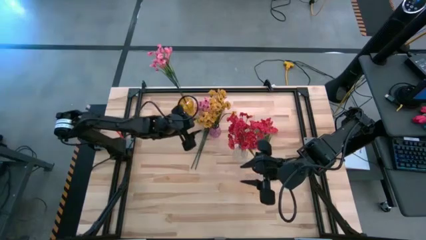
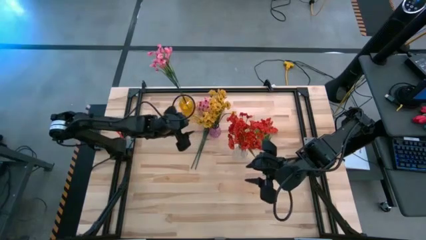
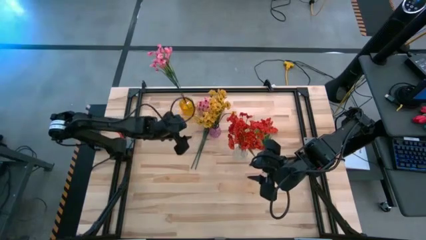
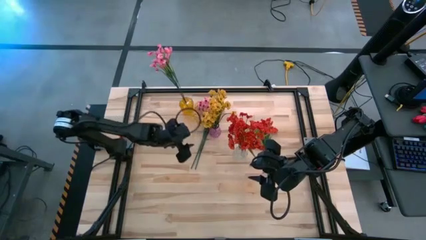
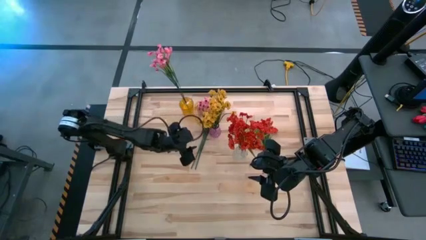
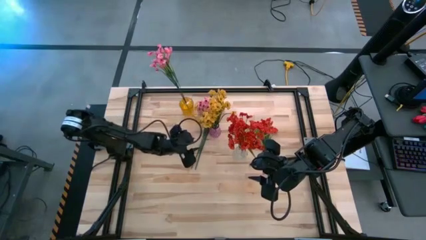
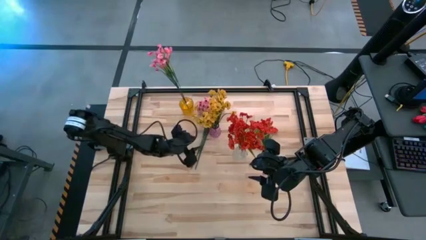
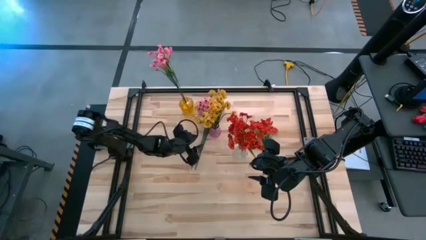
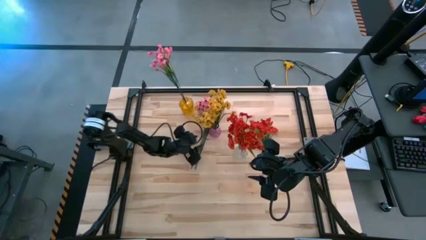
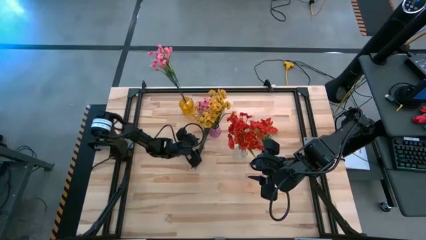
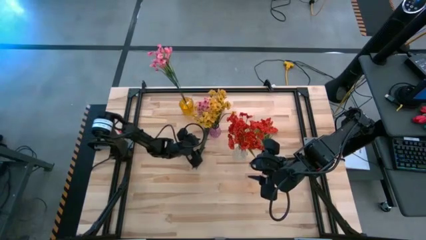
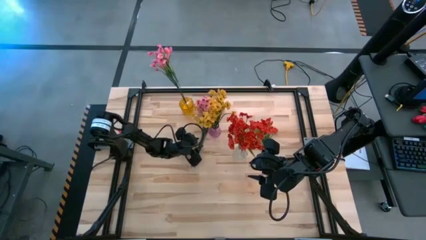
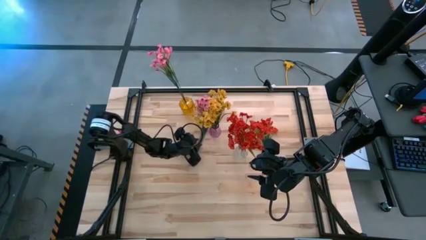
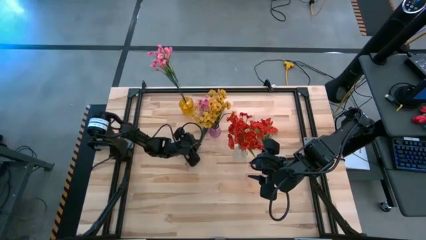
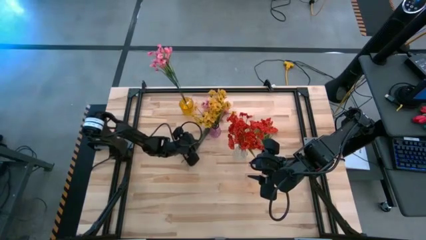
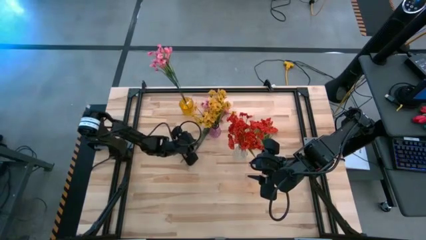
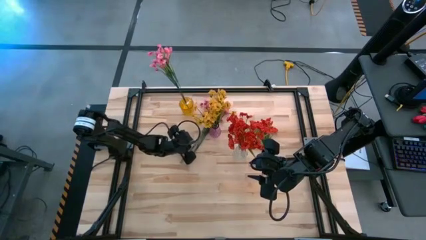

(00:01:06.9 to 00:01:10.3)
Task: Sort flowers into vase by color
Put the left pink flowers into the yellow vase

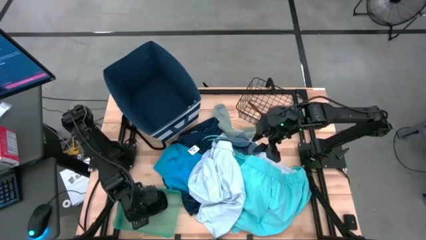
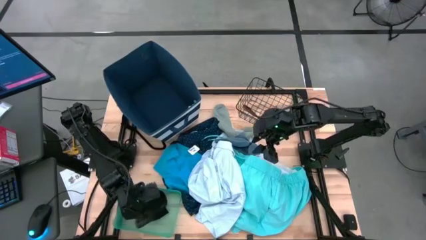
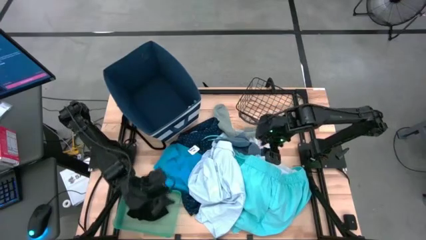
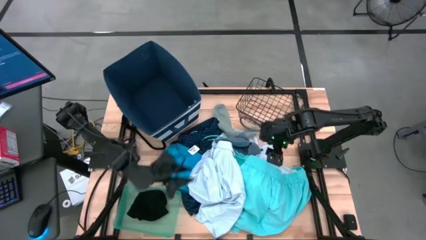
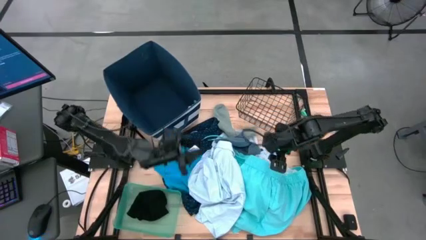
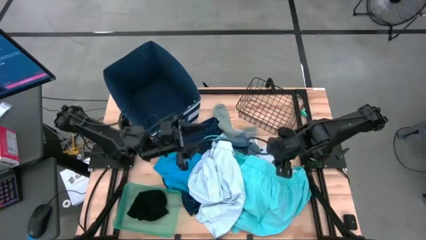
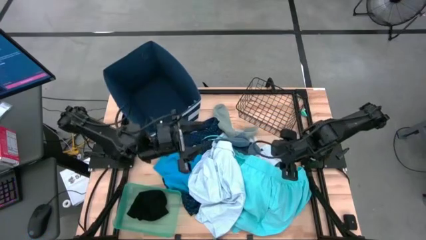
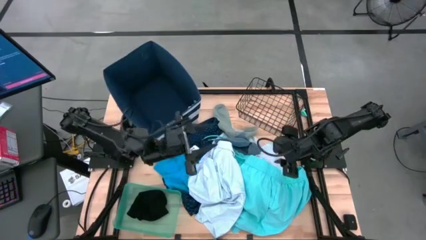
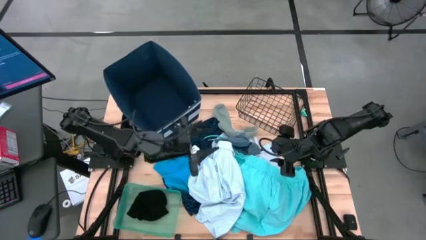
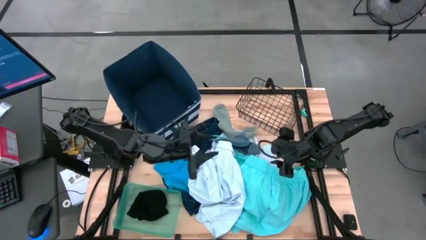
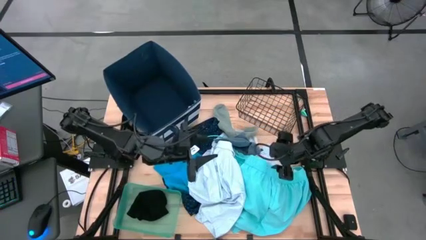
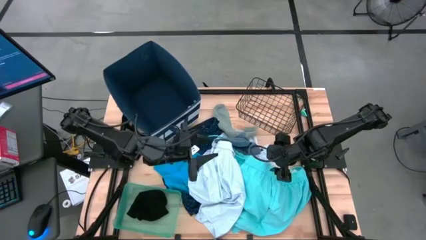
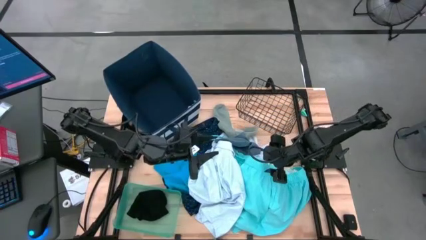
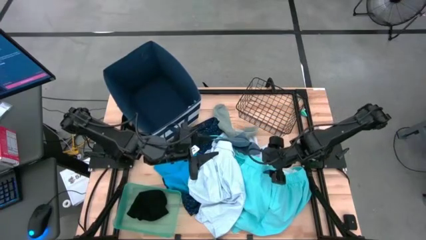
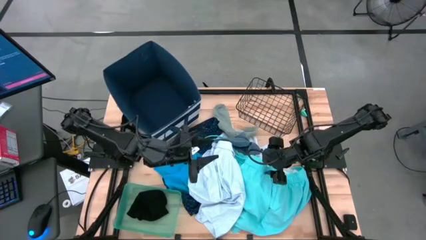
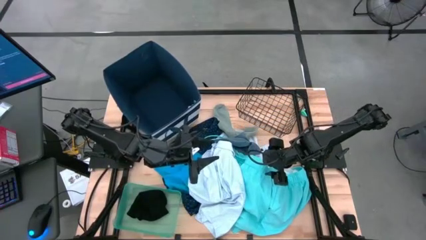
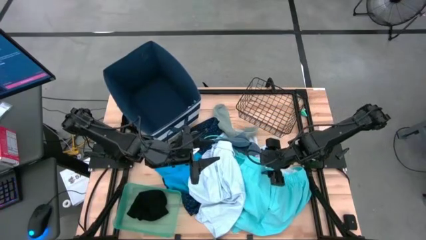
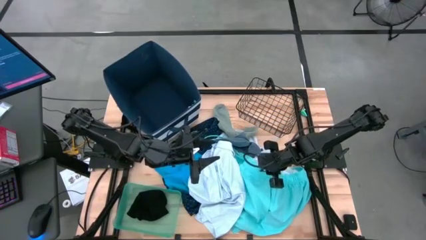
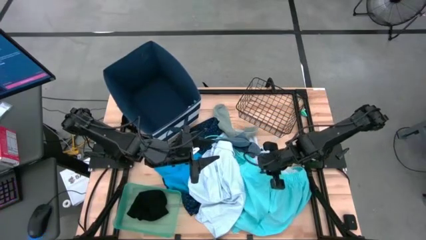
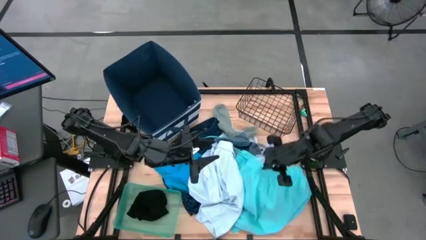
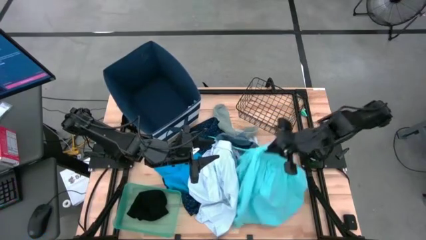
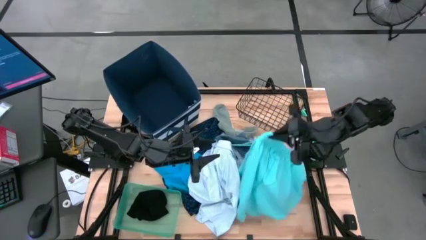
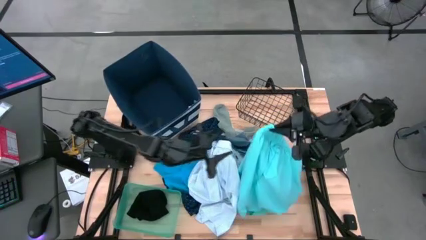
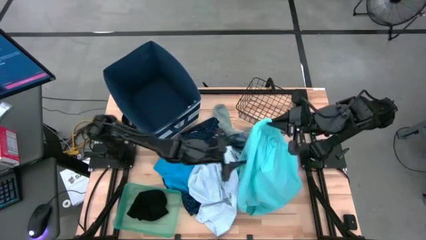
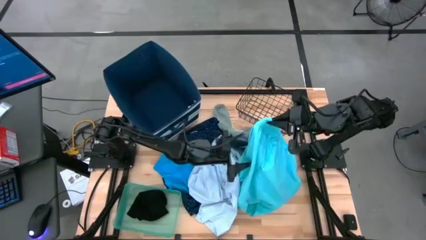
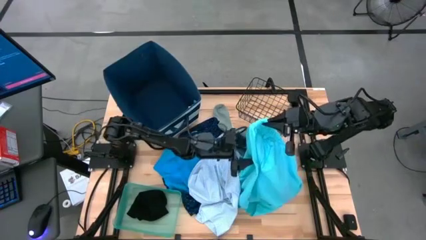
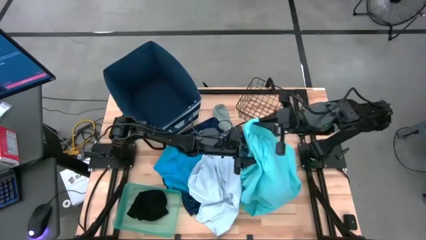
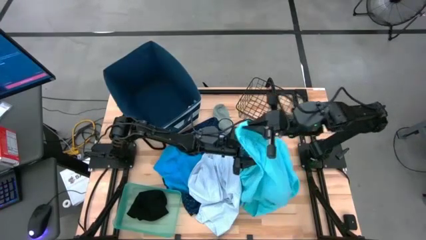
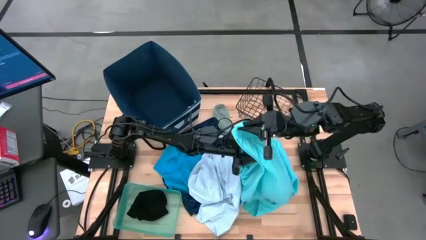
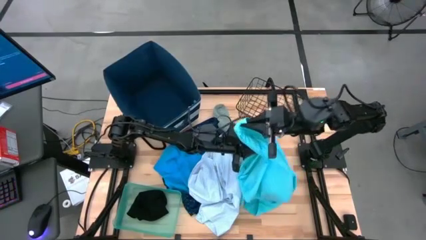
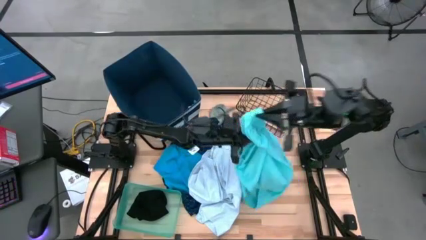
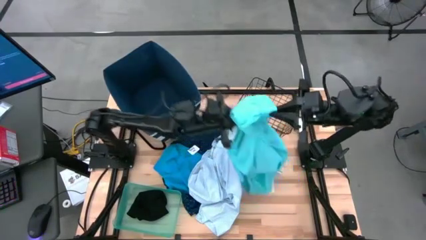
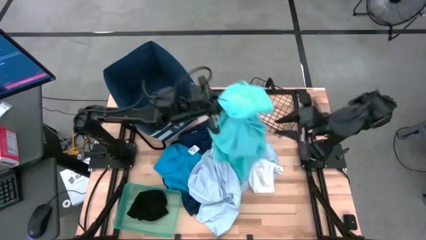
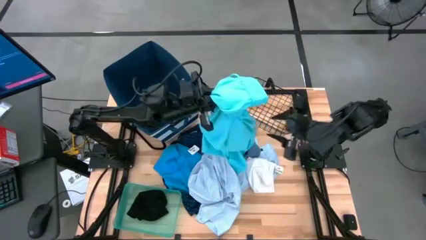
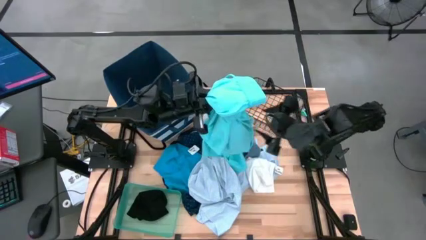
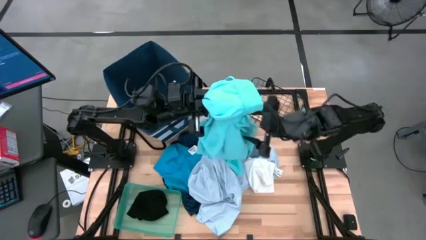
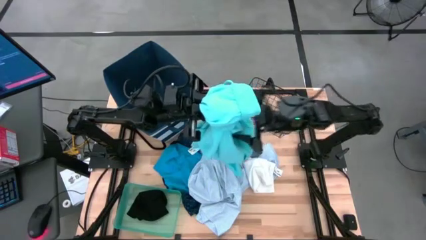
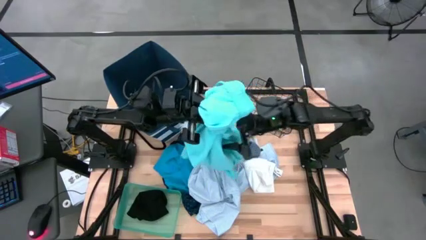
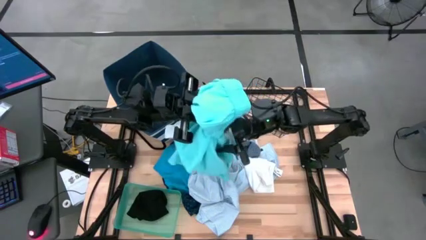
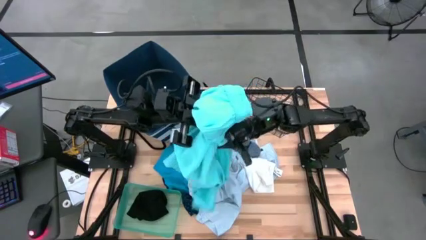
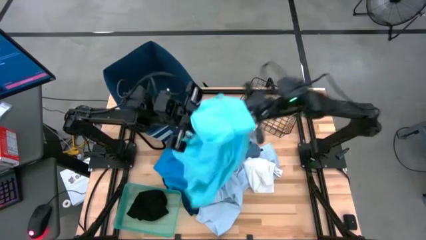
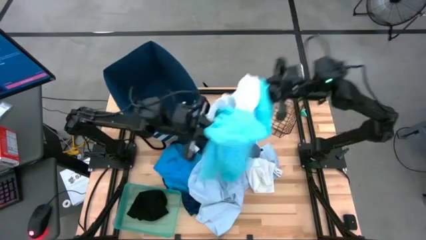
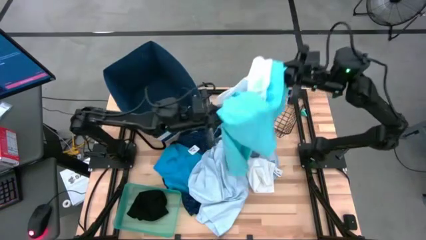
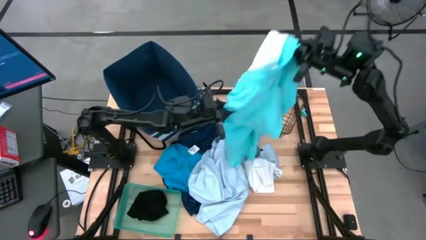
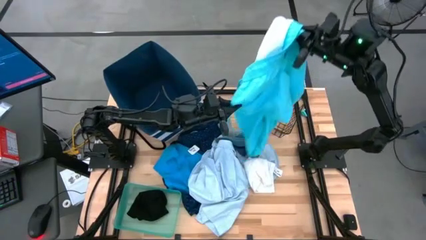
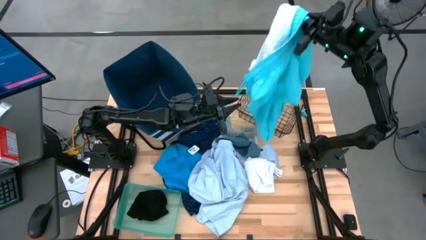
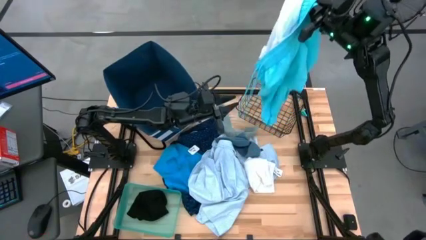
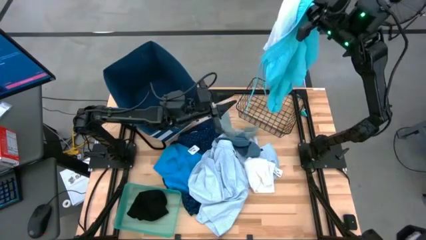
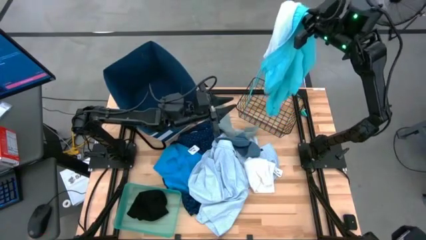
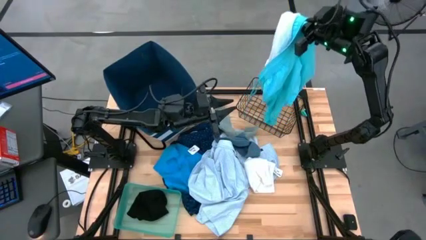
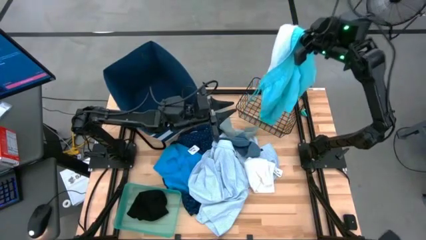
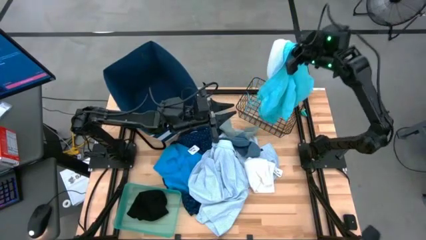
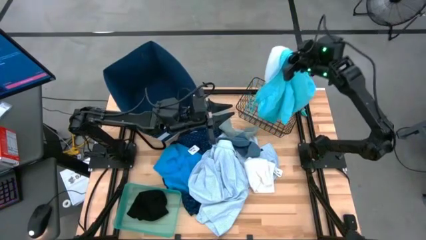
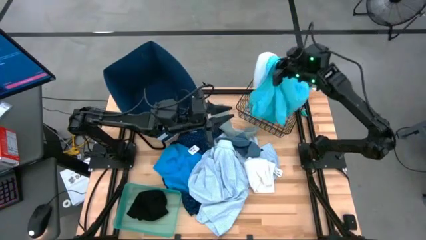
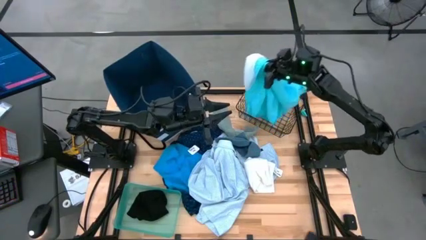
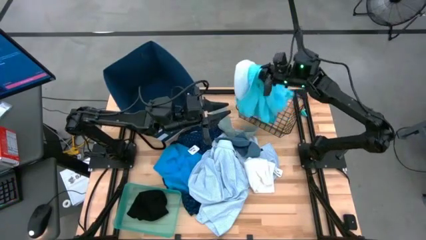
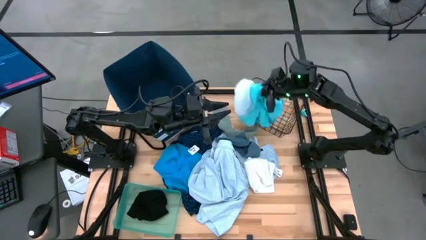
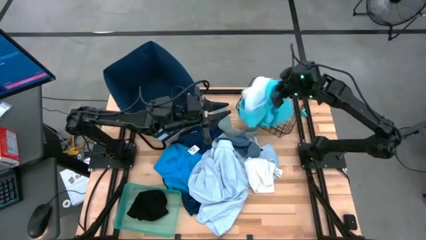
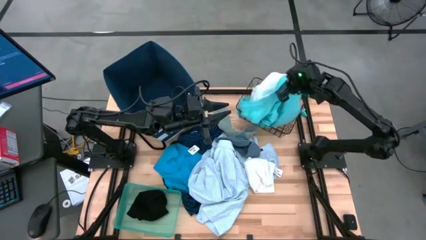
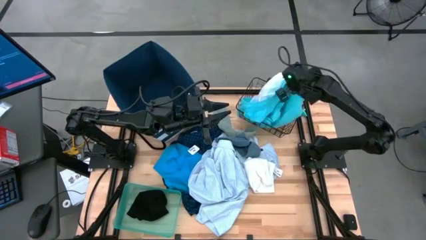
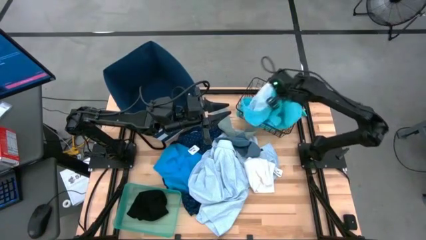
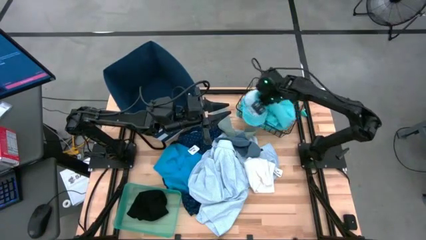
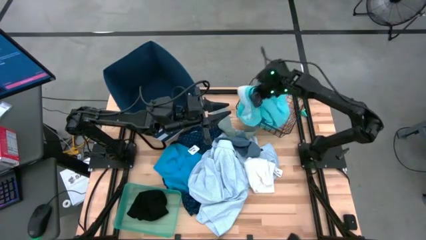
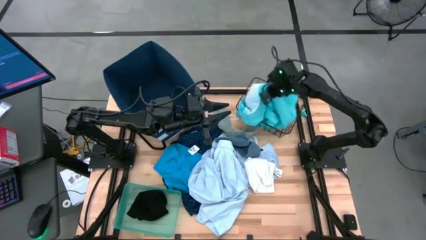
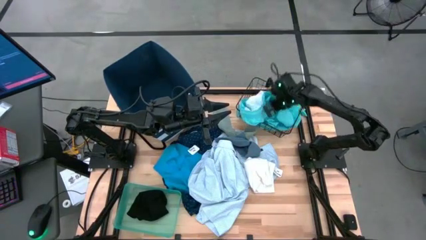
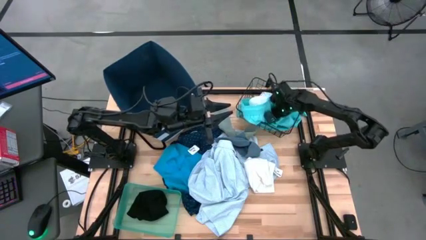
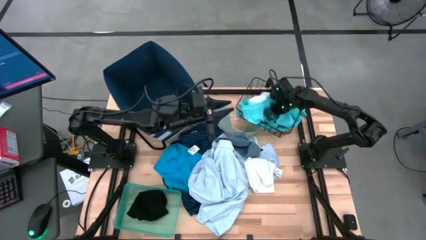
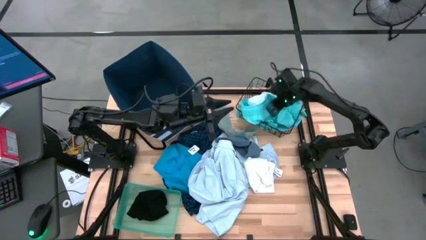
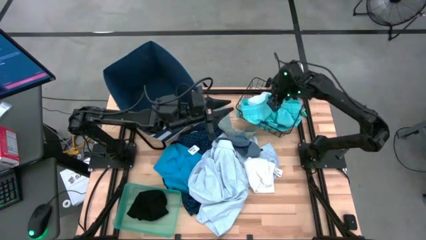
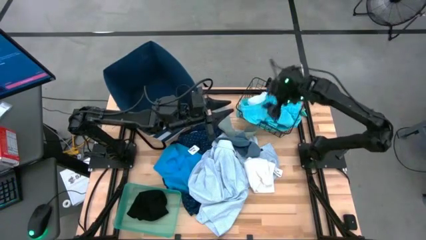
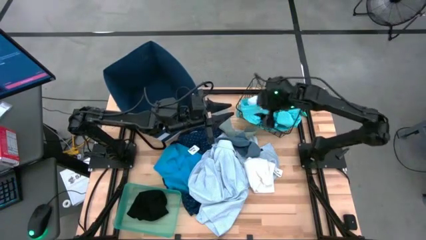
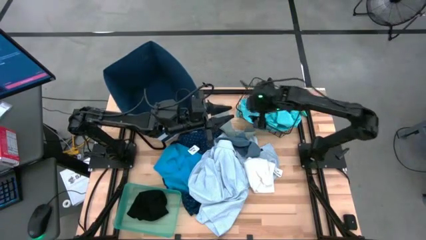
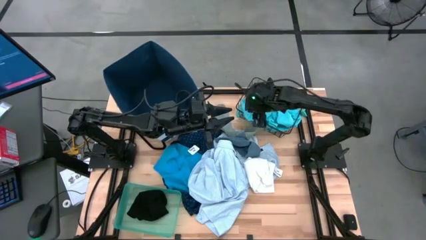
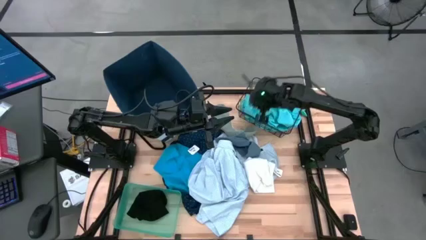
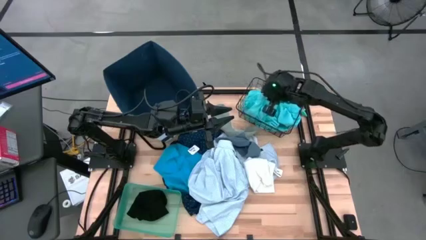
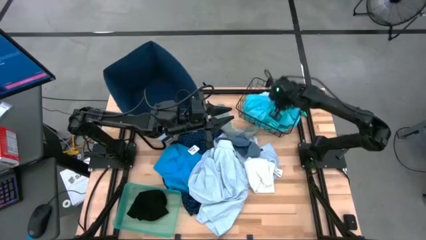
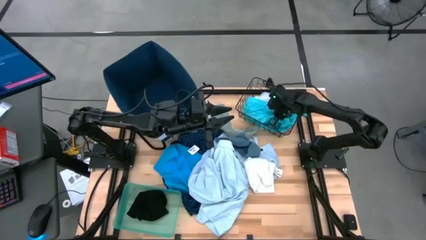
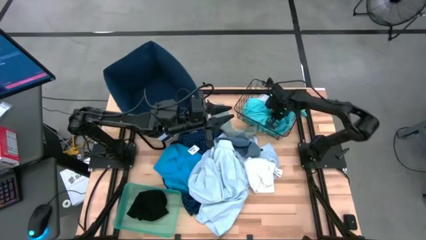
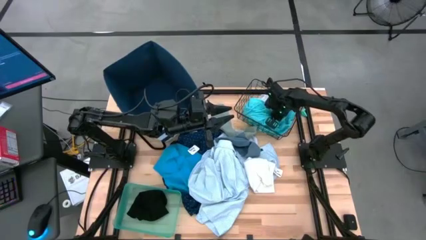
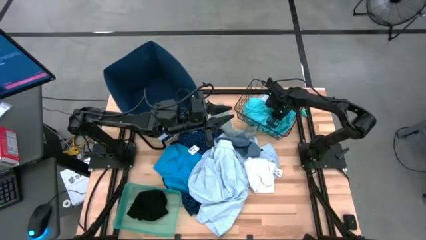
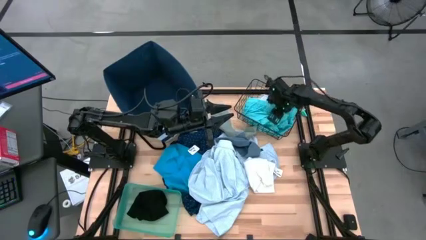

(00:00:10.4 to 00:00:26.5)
Task: Pick & Place Cloths
Put the blue shorts into the black wire basket
